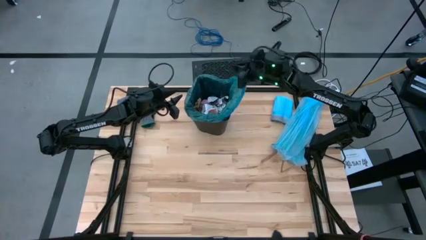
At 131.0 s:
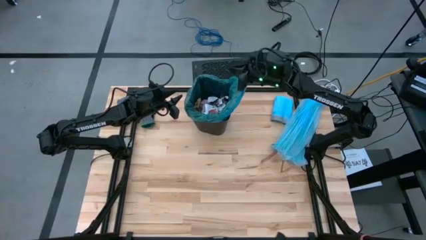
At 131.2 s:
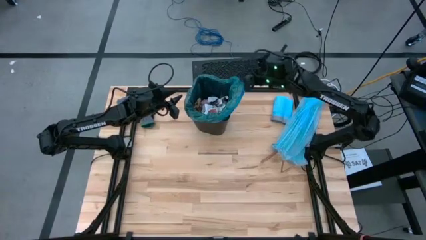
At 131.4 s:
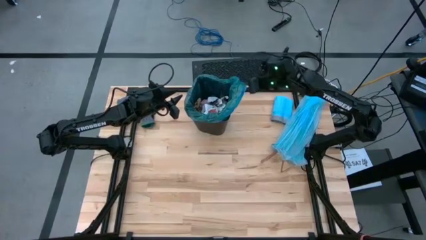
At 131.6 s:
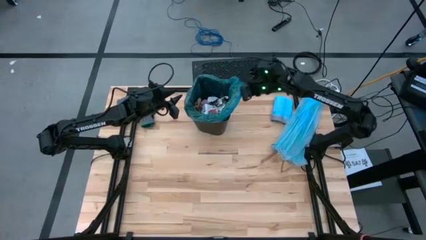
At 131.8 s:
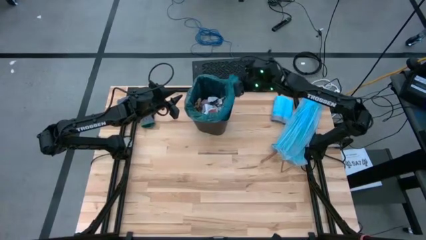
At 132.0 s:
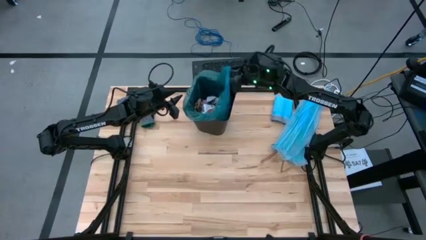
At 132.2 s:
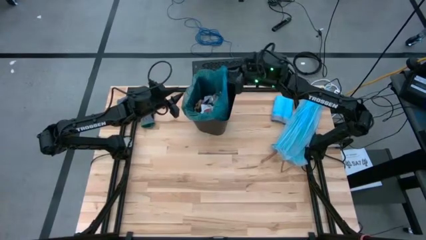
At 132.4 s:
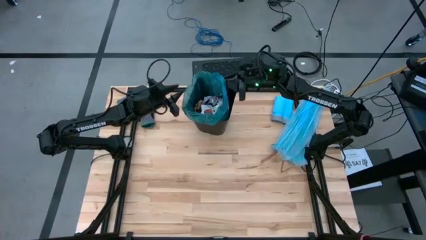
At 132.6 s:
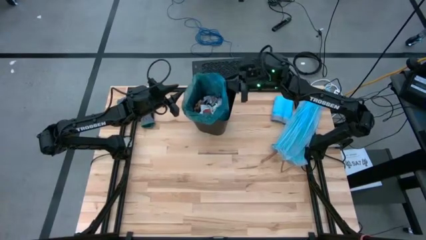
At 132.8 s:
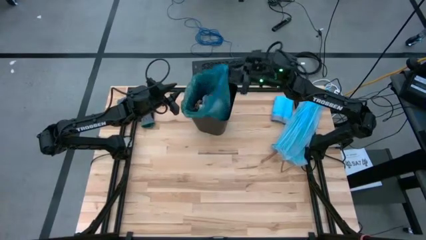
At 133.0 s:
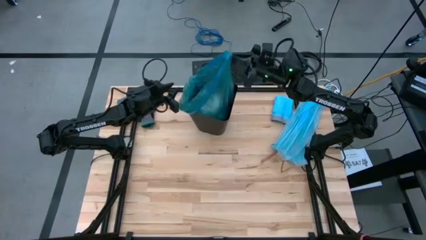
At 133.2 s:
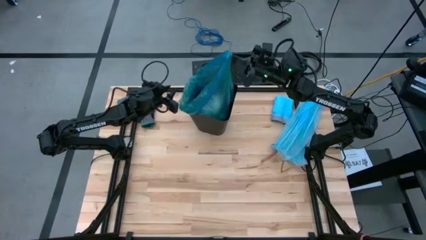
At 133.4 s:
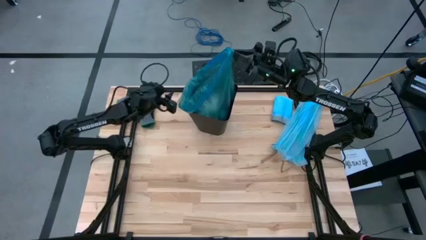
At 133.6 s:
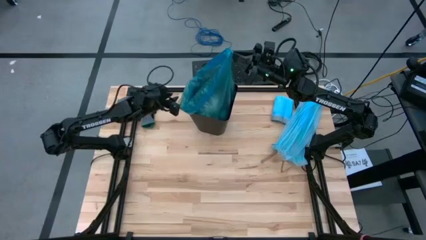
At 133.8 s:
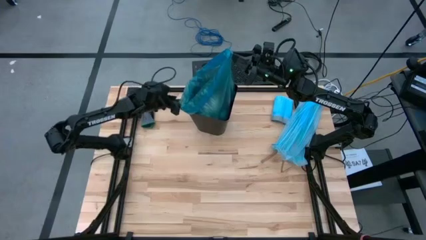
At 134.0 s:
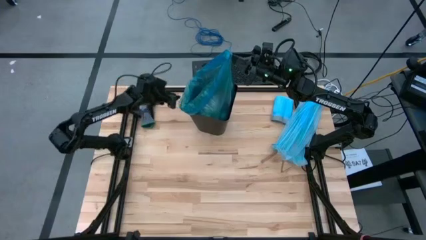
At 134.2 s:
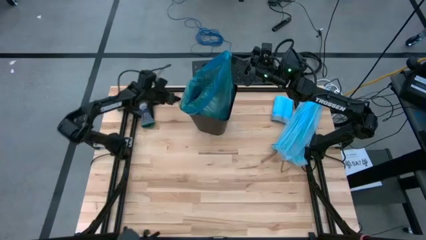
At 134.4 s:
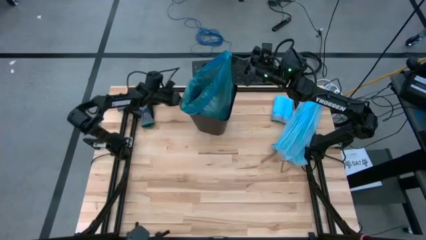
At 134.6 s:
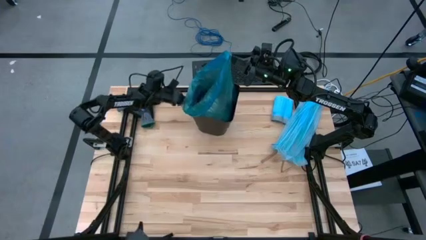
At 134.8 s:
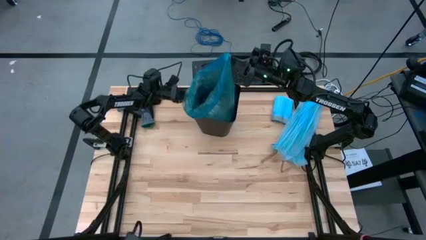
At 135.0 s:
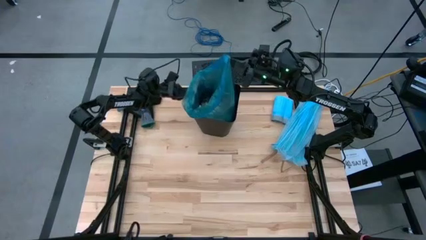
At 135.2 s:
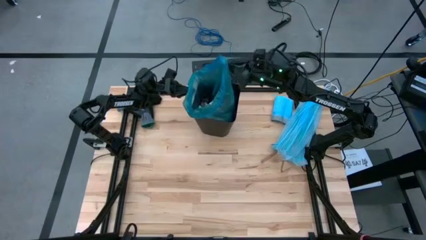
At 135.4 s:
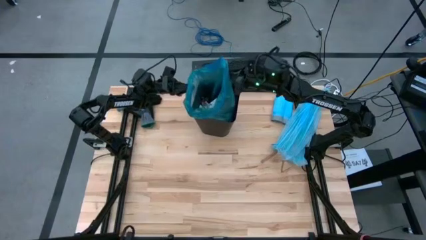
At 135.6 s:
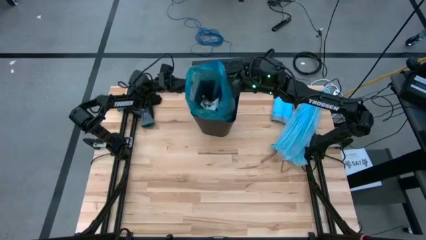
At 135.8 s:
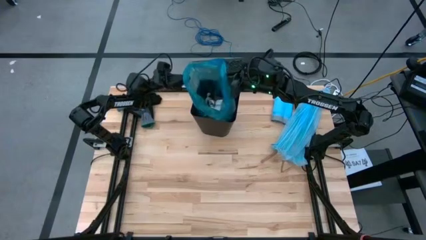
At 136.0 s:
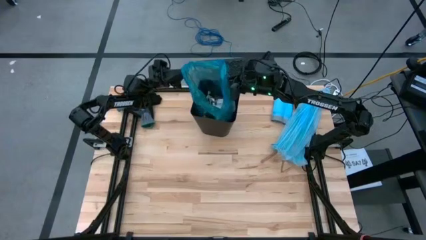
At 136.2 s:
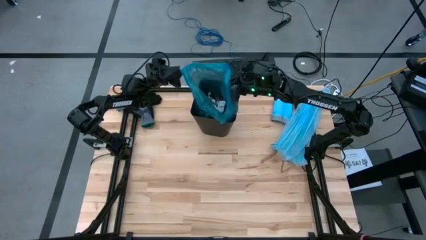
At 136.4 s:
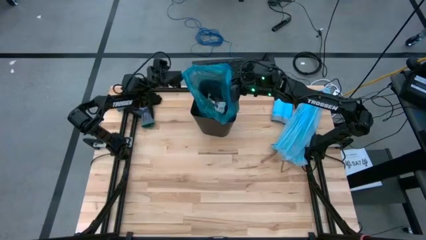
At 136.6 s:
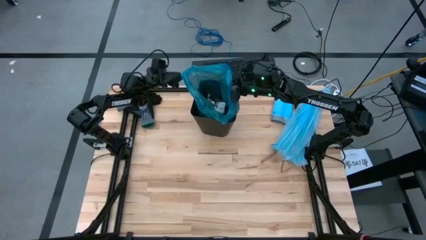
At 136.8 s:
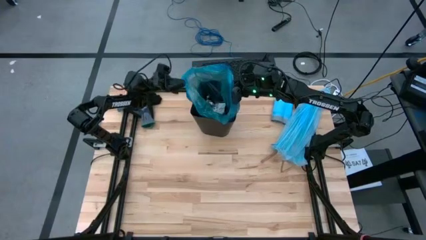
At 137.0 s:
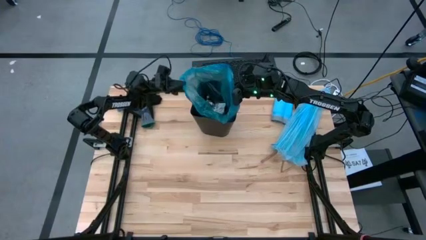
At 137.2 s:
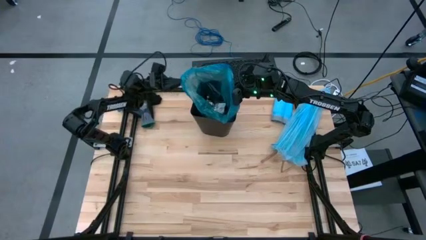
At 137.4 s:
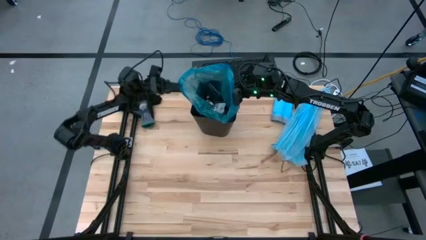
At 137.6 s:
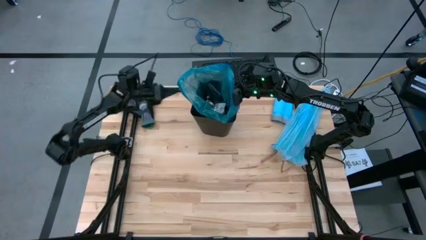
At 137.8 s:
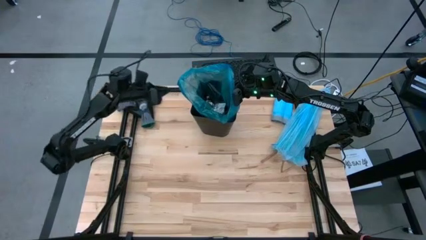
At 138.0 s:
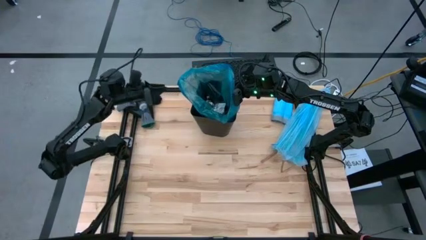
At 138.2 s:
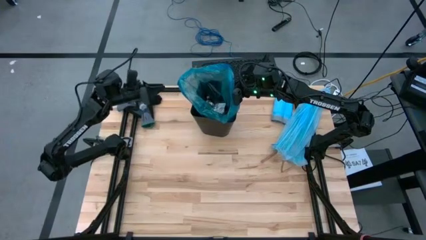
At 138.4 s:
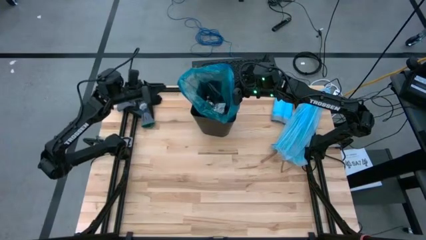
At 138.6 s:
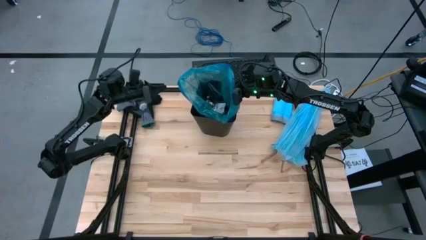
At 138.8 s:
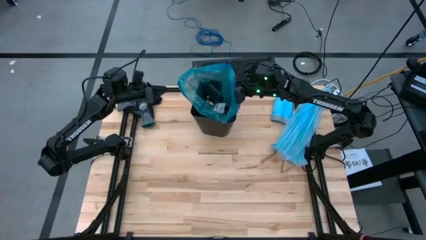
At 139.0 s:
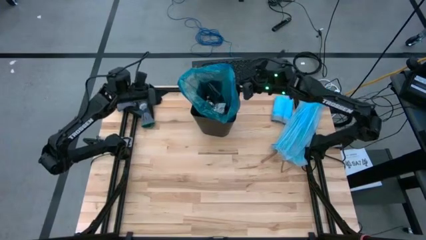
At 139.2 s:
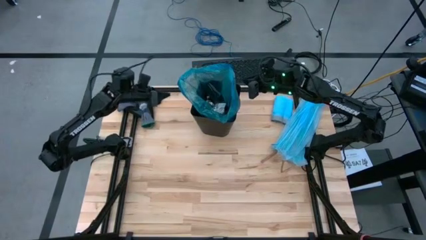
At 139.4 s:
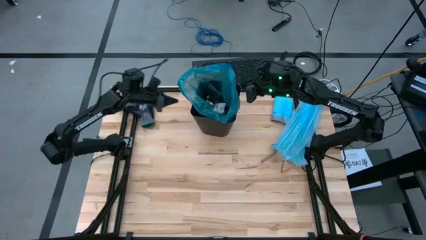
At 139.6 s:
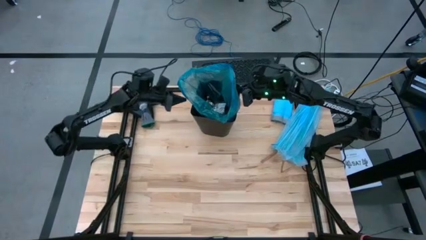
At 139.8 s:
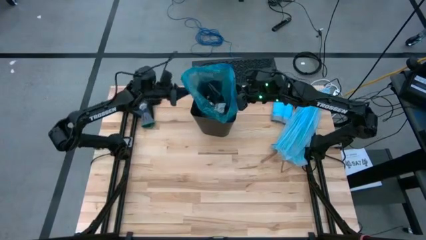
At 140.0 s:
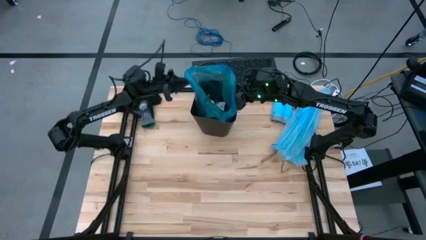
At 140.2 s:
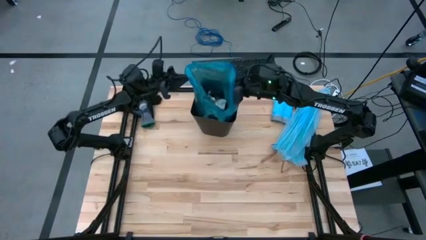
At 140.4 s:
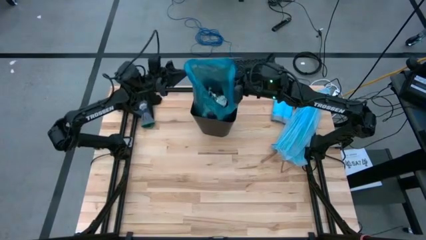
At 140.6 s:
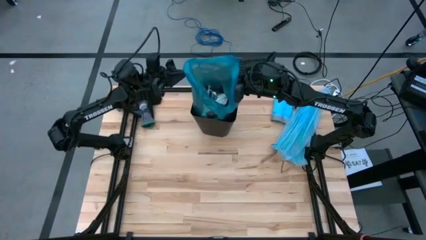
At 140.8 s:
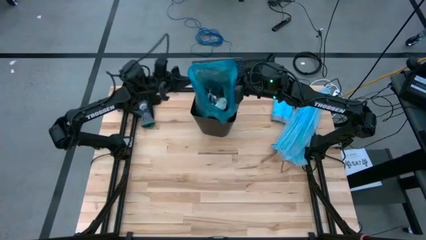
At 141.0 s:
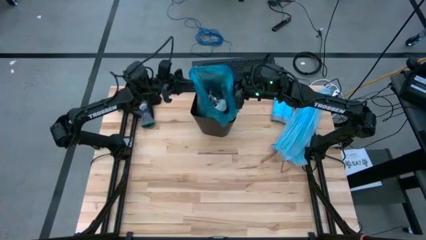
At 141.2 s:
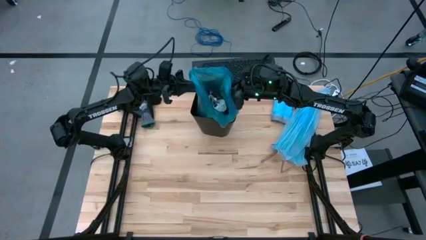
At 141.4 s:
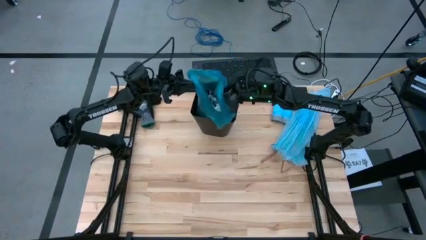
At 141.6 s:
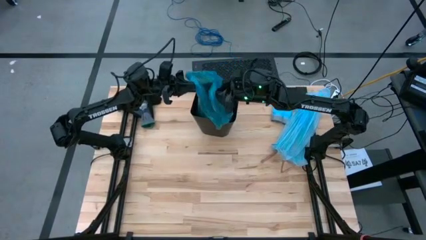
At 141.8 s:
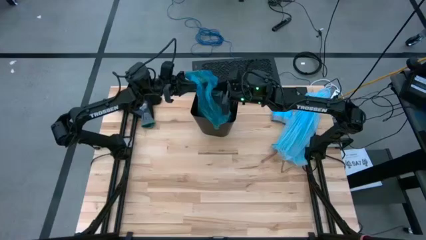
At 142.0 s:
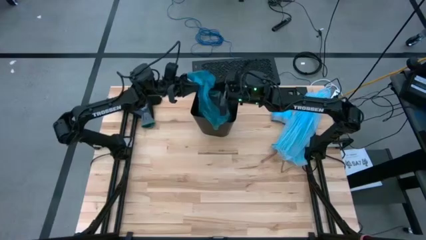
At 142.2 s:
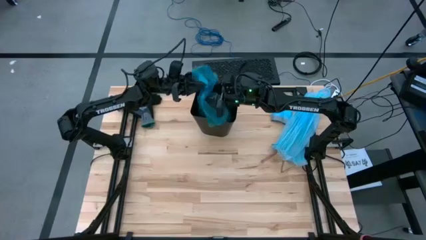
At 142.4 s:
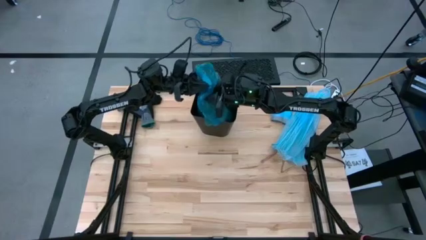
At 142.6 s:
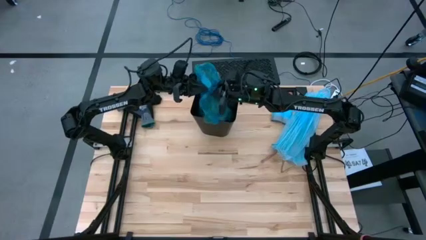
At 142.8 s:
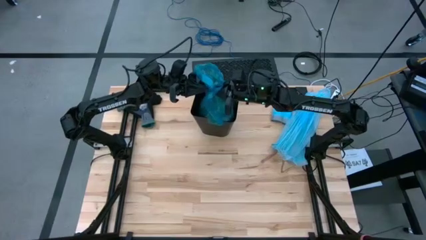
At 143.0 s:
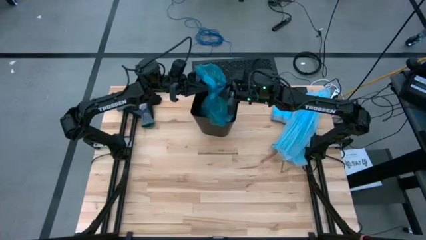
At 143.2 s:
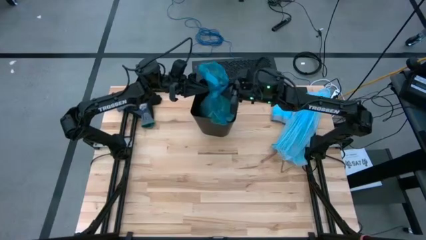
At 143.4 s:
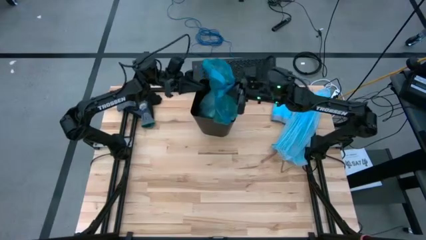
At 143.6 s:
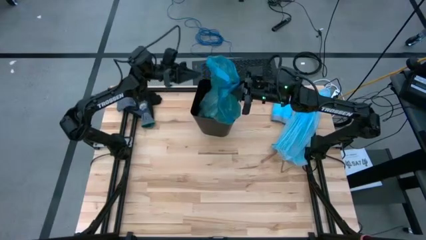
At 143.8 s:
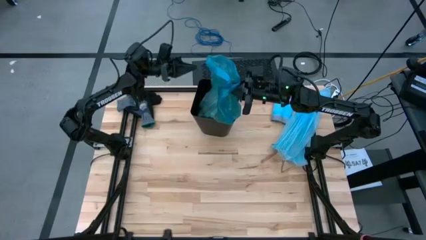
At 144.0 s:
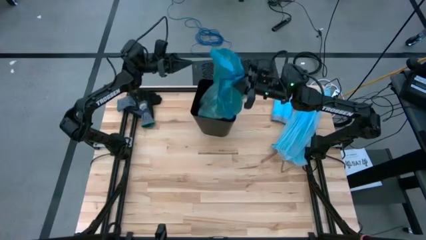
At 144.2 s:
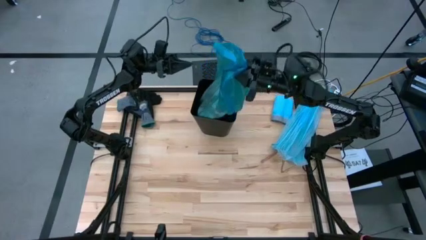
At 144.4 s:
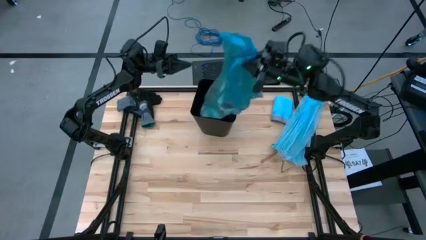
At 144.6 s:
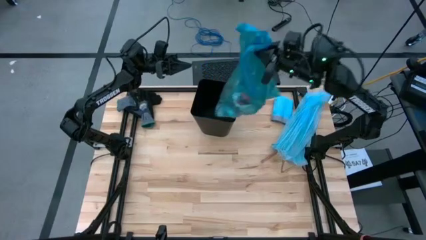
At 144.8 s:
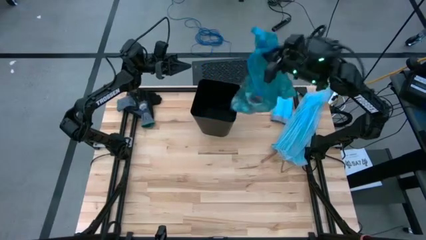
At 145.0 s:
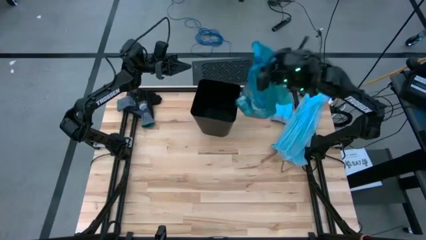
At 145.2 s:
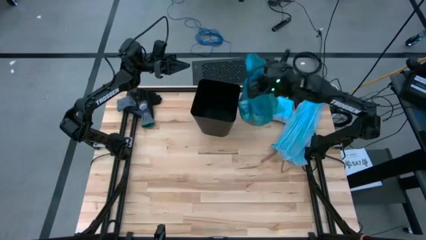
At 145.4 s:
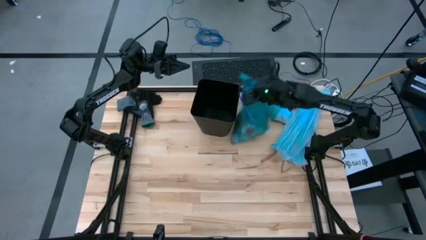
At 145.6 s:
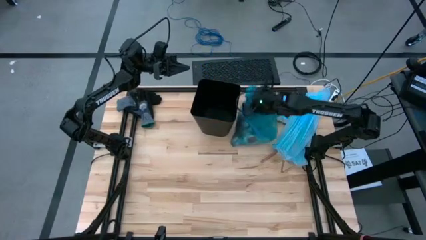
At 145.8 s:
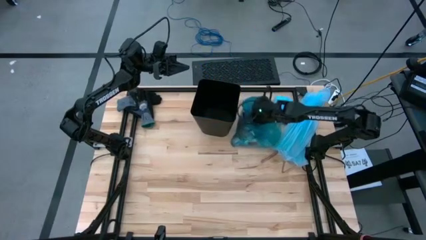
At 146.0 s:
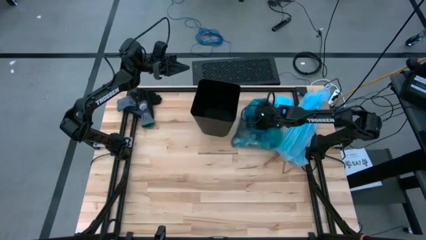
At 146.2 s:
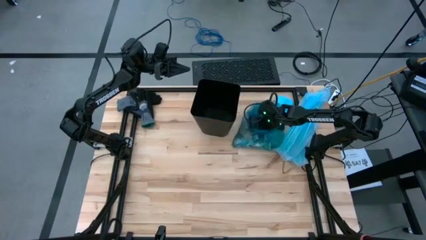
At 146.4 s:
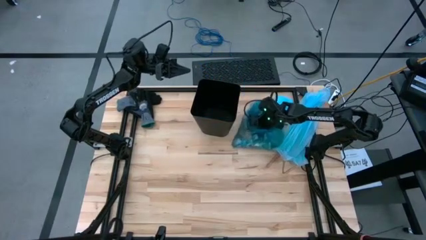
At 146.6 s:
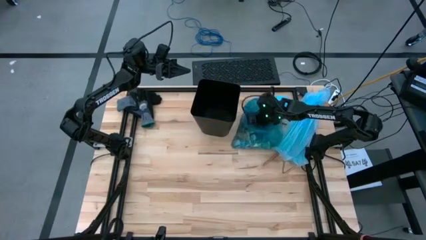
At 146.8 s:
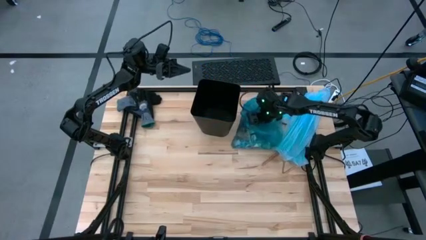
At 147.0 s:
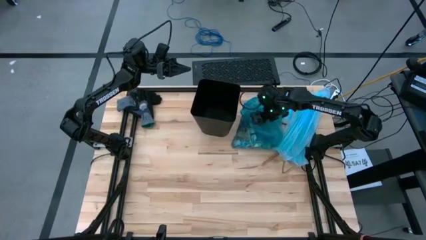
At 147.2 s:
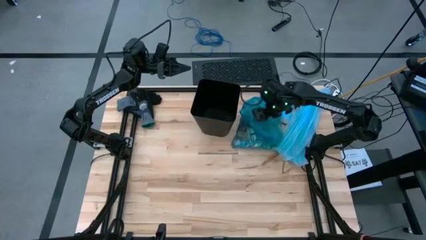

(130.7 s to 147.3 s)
Task: place trash/remove bag and relplace
Remove the blue trash bag from the trash bin
